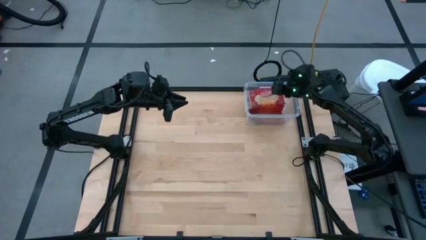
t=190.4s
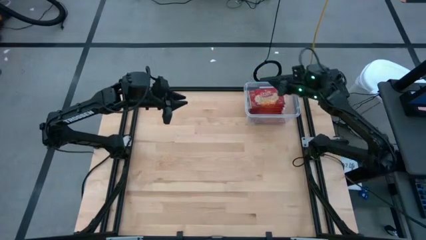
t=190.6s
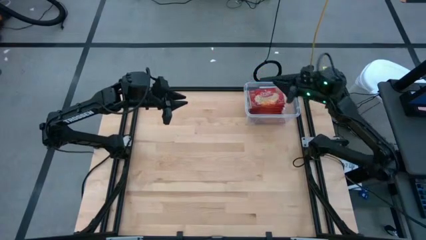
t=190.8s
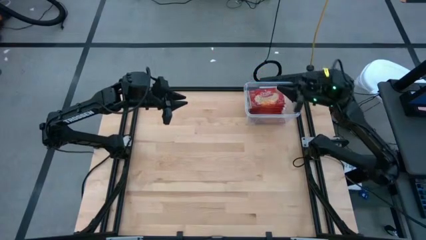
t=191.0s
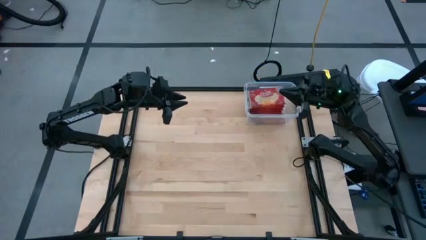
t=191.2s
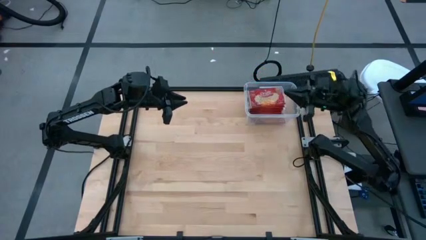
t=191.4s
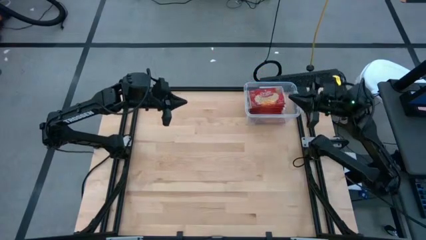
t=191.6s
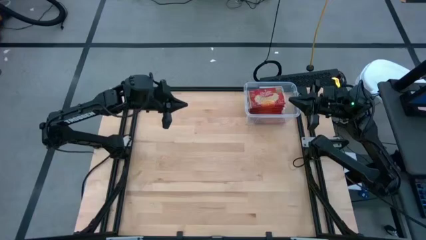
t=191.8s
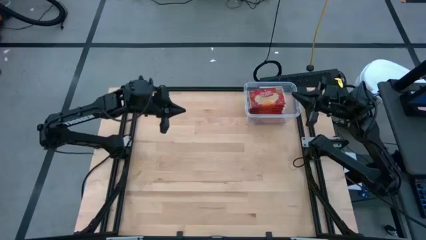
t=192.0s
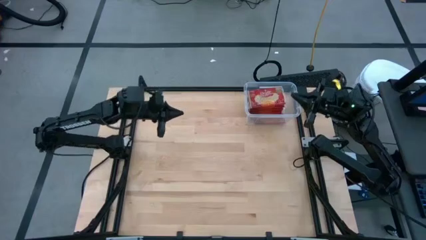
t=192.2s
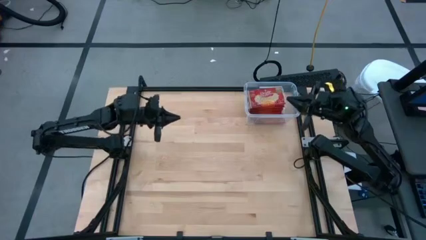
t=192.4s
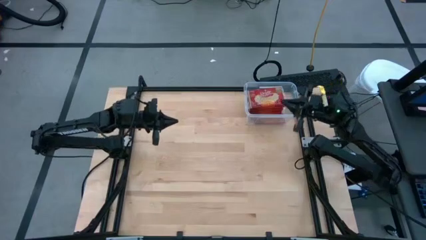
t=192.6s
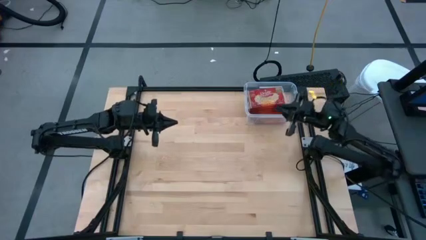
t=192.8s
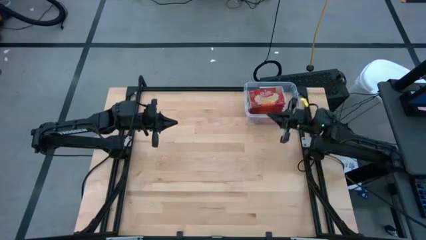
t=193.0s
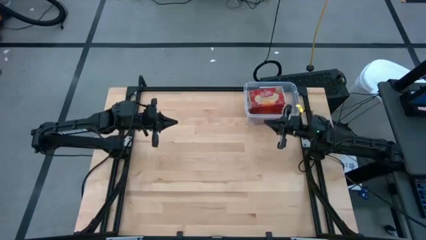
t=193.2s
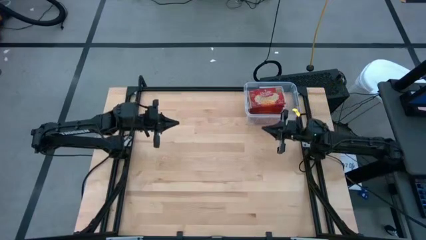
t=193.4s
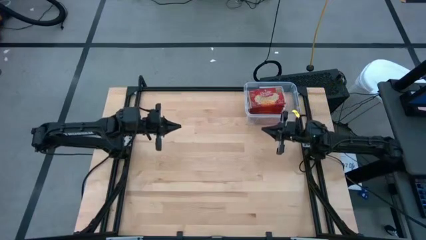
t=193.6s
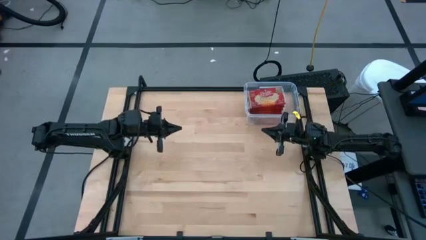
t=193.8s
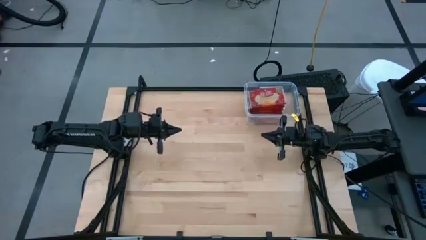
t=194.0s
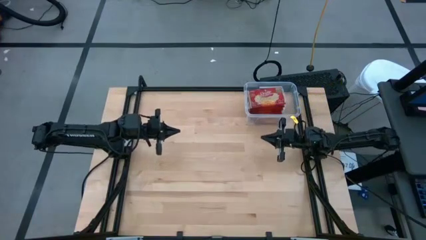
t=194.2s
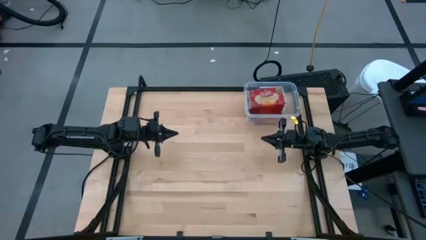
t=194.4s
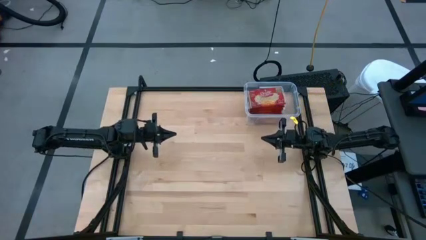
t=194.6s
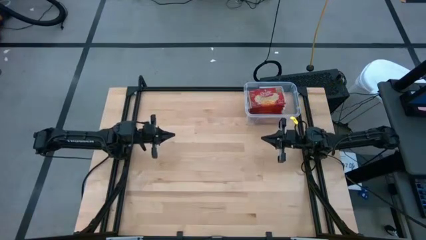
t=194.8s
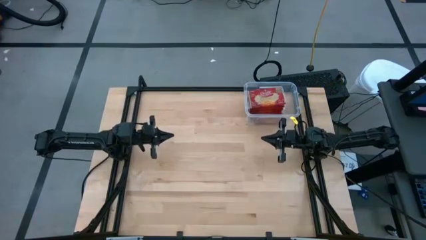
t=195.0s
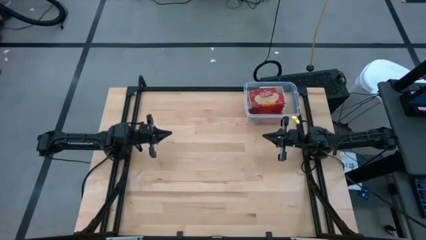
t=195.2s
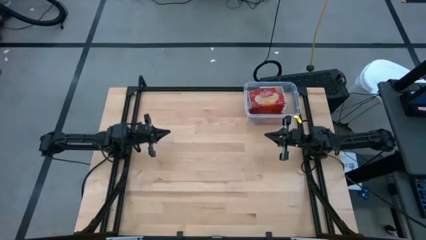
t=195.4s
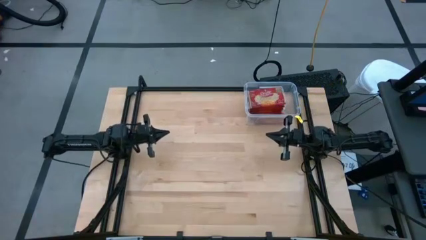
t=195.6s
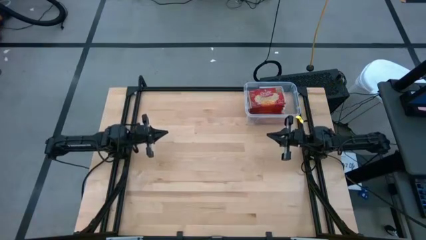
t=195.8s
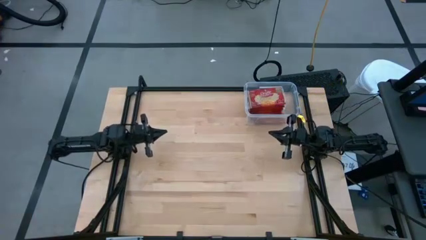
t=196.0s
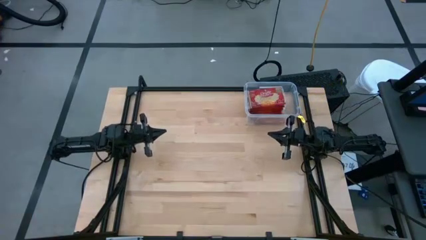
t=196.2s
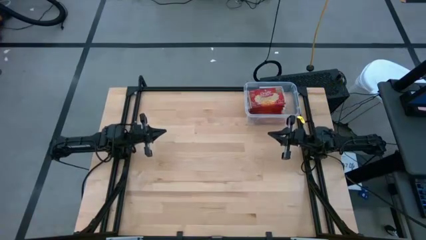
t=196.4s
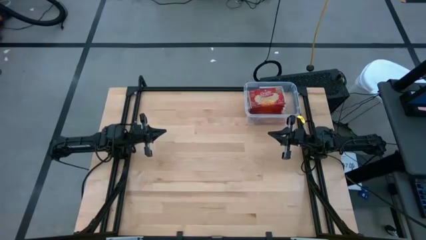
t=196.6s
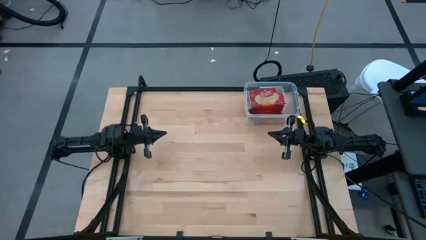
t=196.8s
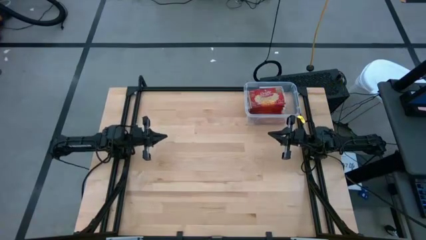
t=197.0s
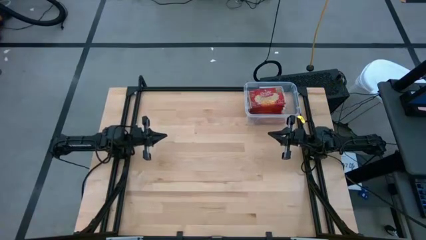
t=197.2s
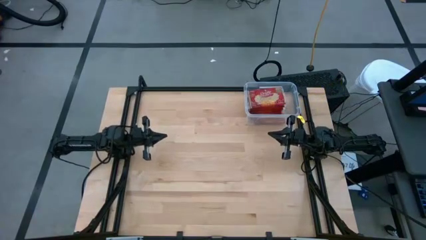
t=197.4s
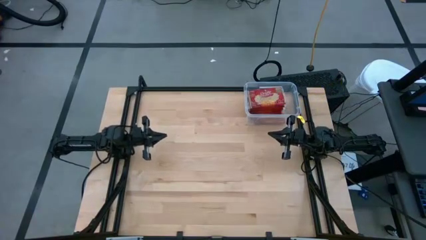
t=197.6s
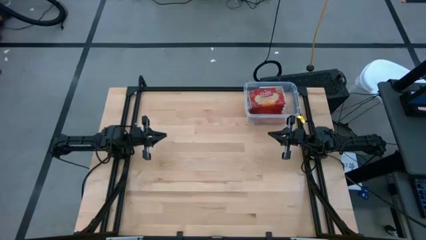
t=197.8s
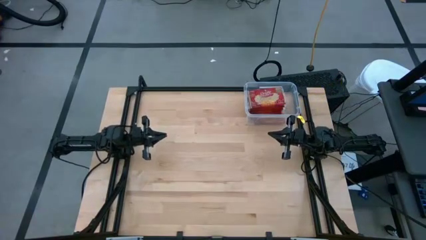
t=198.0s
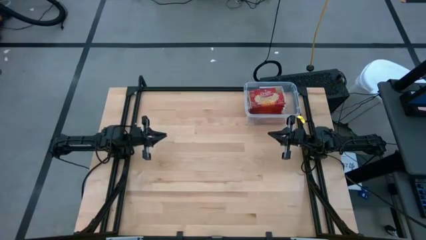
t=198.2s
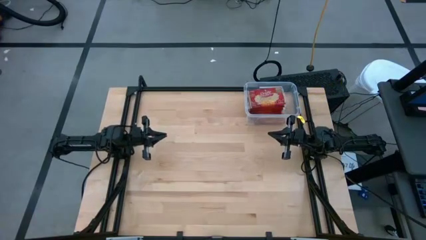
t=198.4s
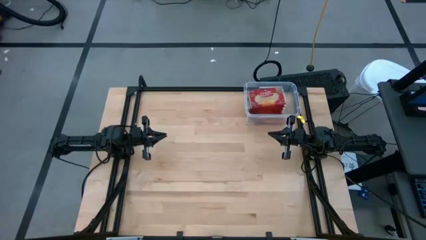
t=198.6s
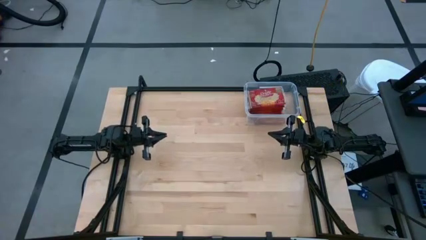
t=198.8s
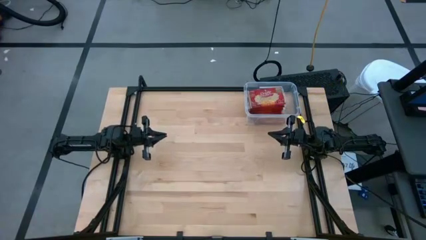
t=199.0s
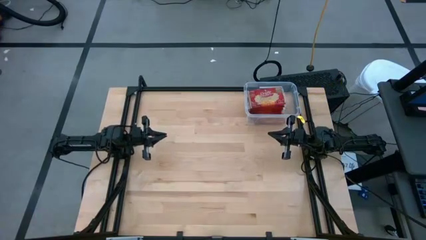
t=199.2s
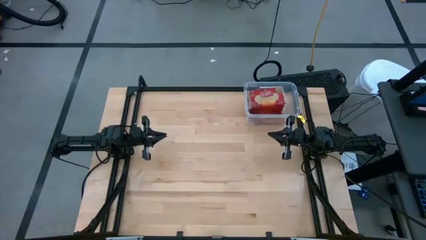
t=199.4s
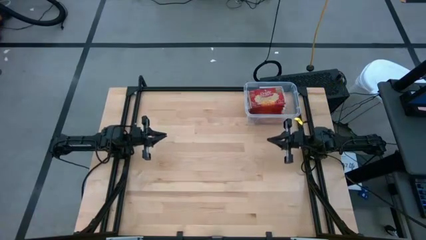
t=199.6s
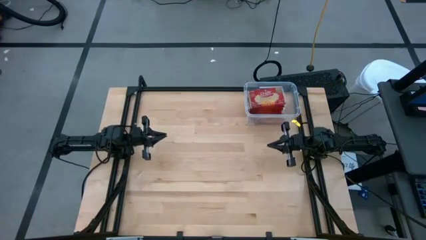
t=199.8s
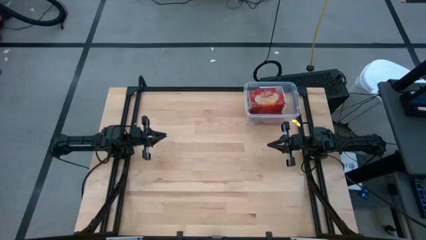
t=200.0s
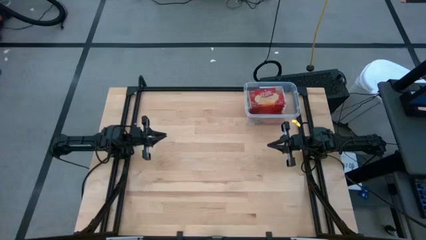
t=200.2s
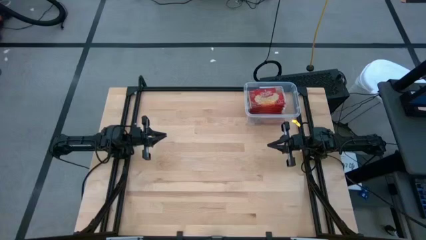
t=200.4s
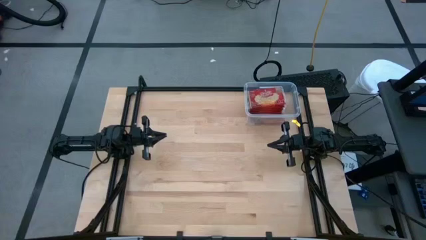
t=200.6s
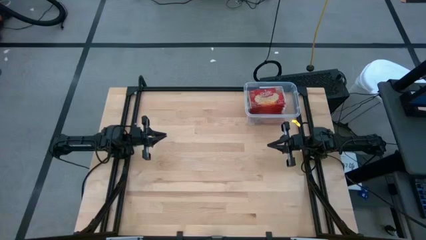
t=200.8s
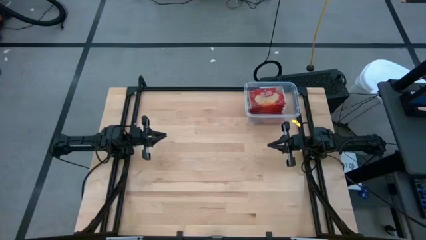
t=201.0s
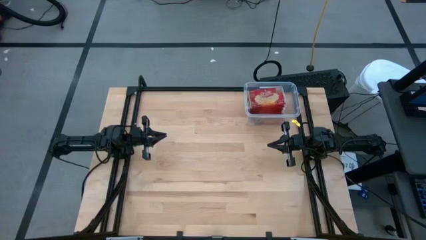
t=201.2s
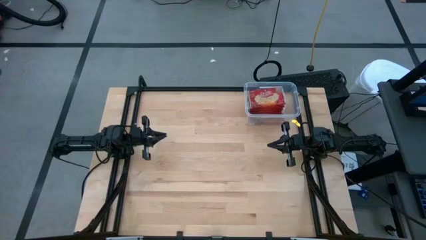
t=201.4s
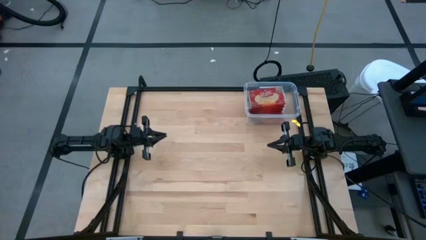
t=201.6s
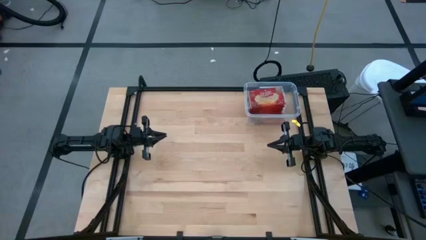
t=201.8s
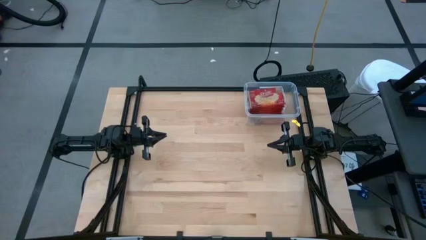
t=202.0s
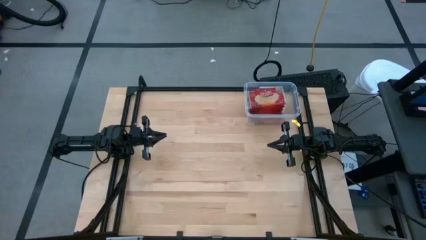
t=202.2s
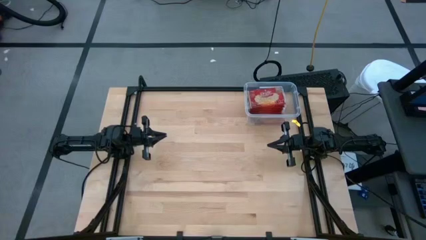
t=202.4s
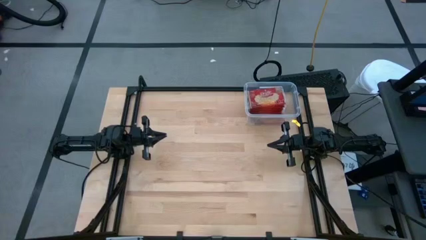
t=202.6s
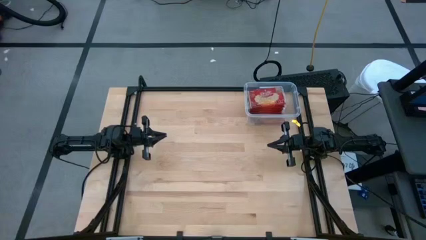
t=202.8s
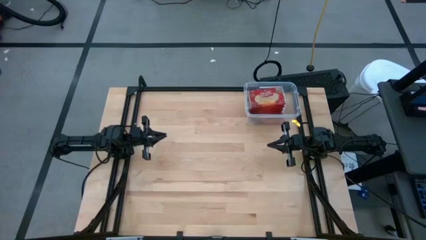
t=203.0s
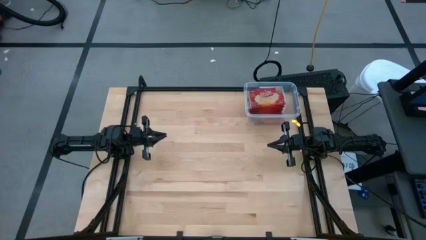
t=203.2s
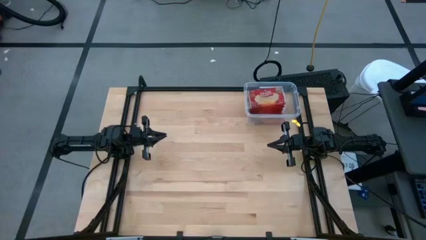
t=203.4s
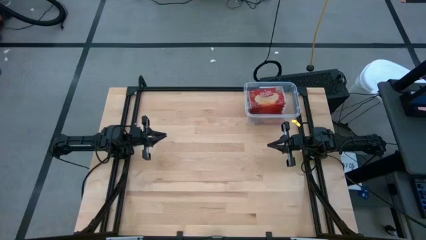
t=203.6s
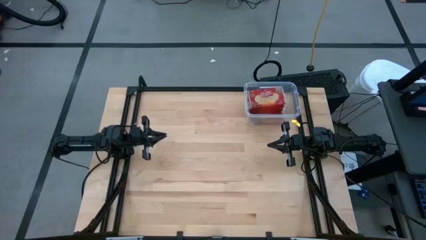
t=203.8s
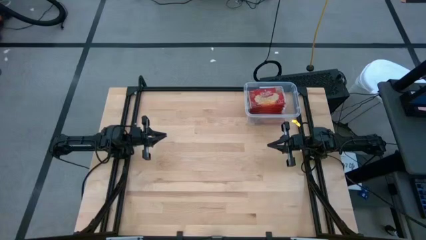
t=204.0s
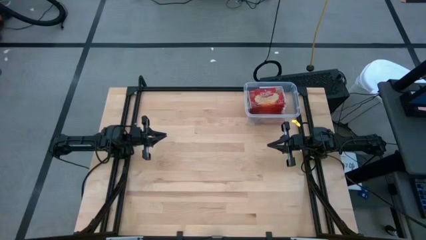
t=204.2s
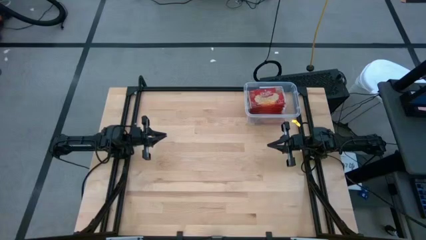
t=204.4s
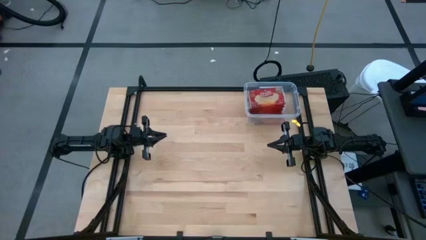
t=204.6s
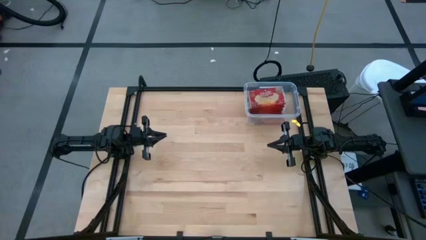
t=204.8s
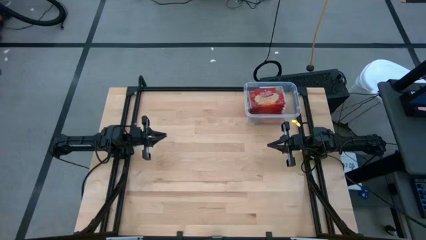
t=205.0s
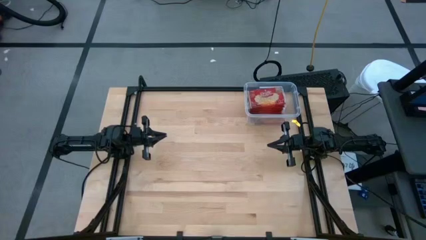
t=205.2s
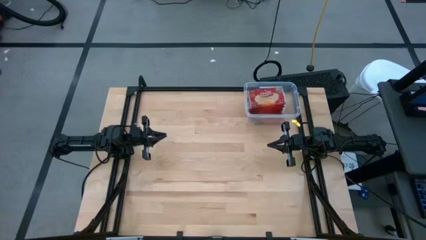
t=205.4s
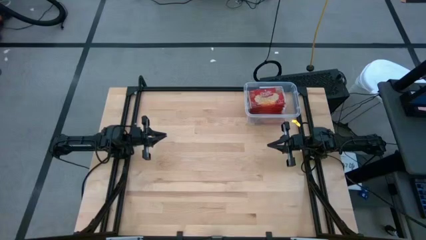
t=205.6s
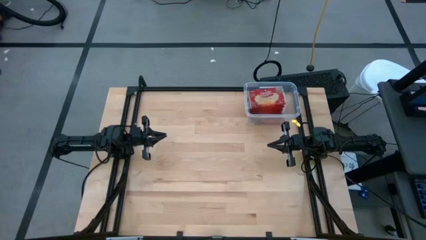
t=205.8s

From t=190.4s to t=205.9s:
Task: Sort popcorn bags into baskets
Return to Home Position
